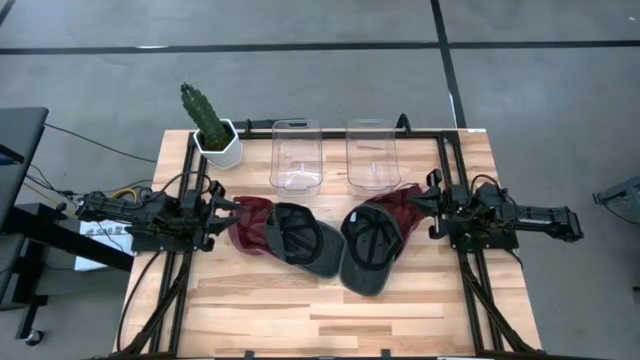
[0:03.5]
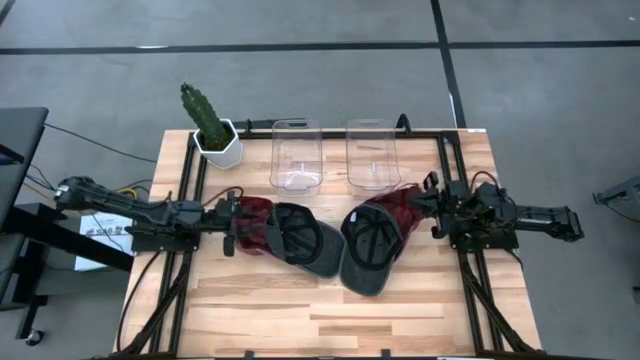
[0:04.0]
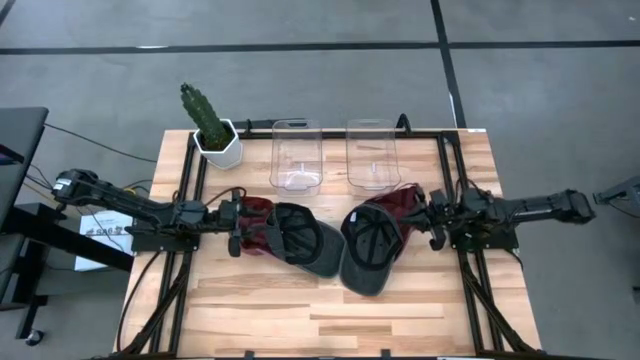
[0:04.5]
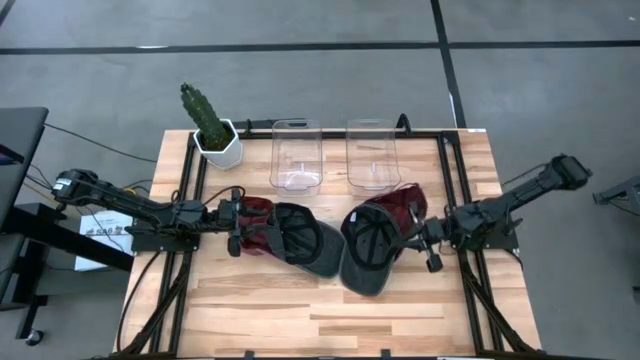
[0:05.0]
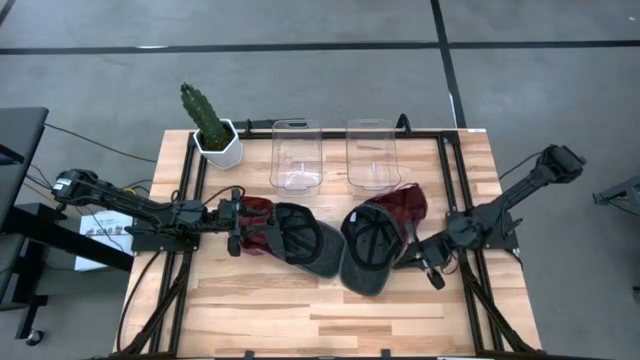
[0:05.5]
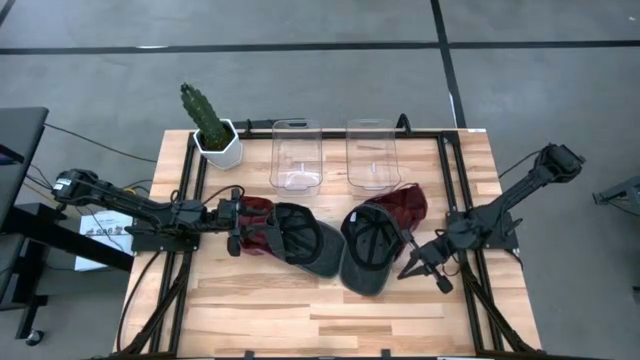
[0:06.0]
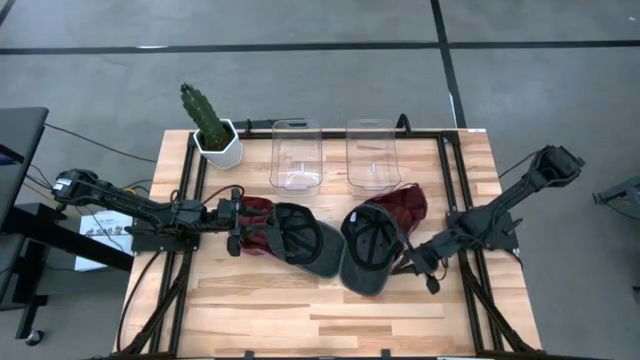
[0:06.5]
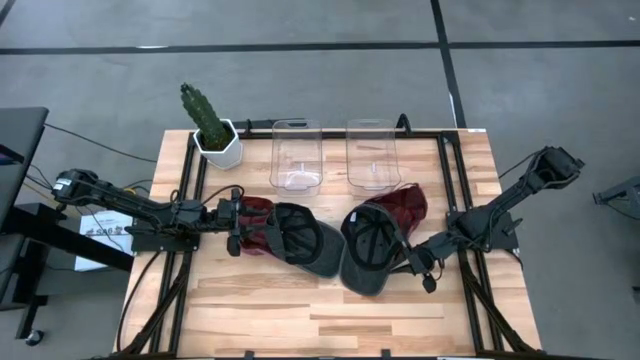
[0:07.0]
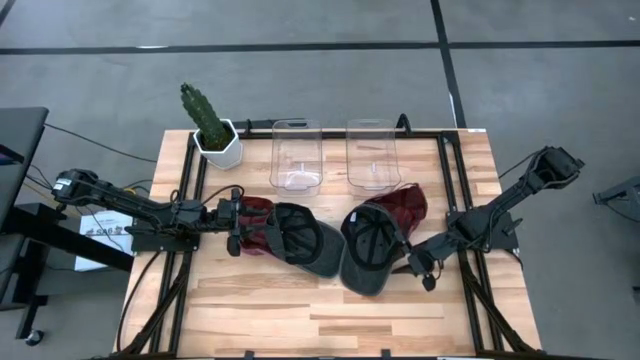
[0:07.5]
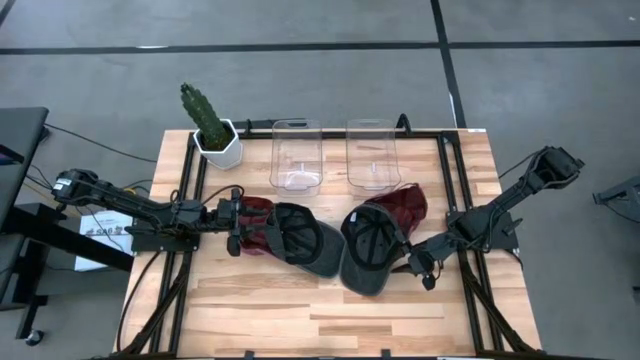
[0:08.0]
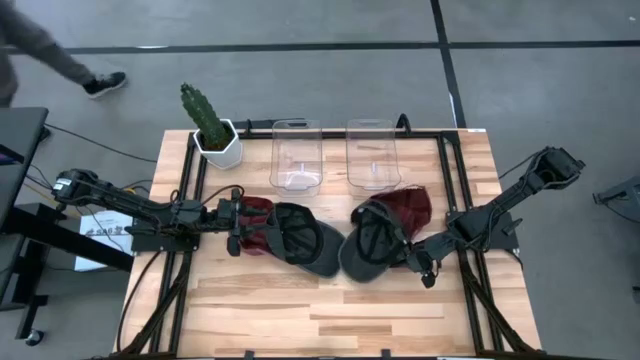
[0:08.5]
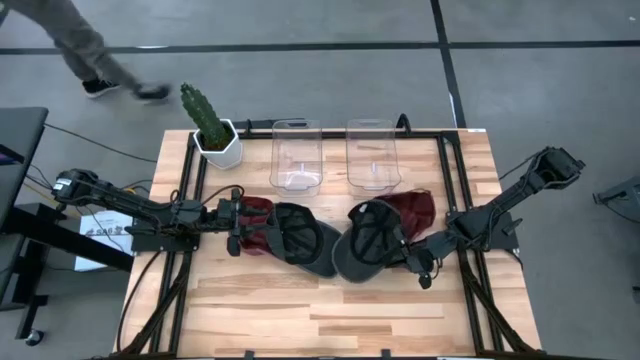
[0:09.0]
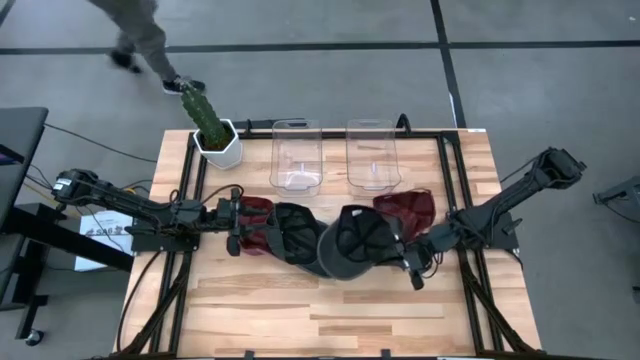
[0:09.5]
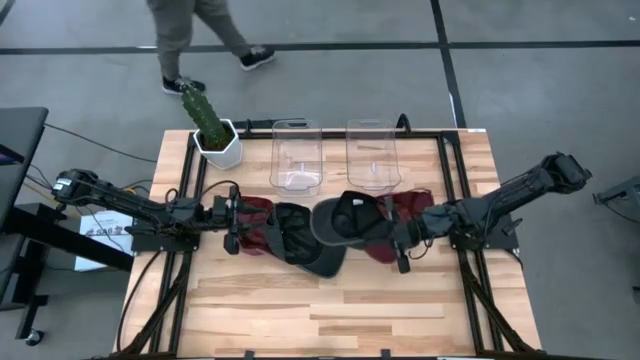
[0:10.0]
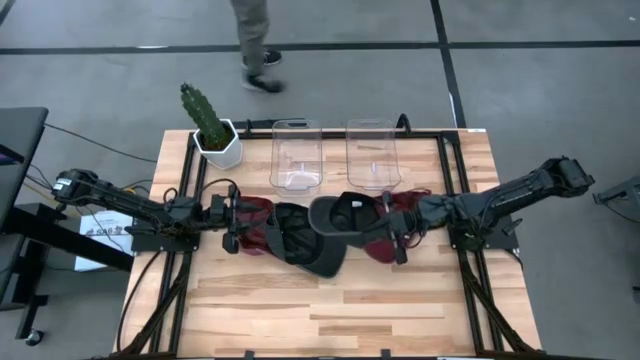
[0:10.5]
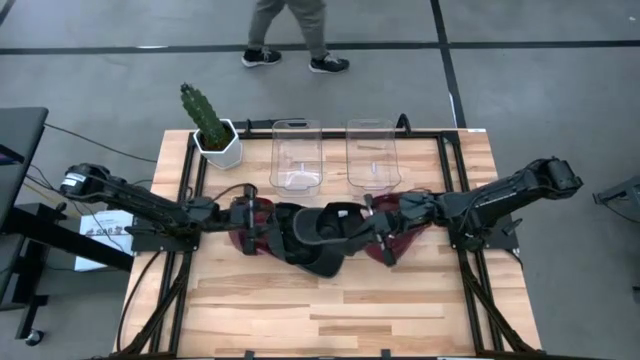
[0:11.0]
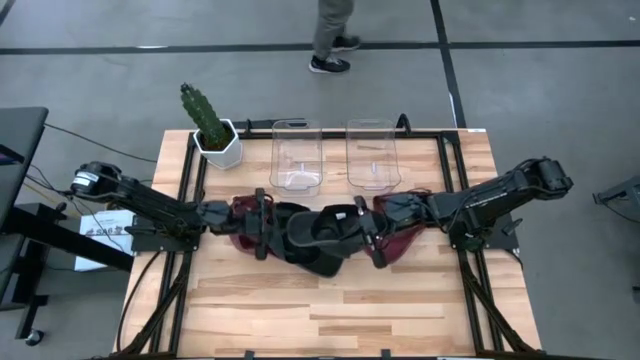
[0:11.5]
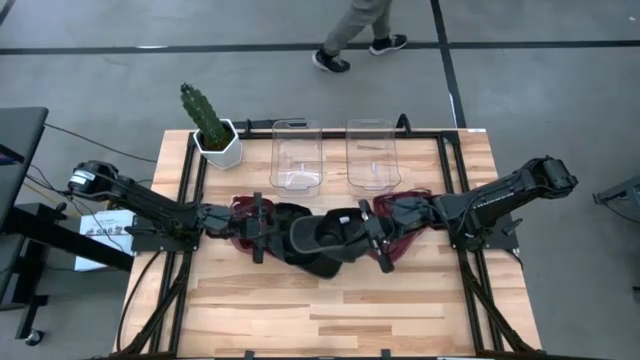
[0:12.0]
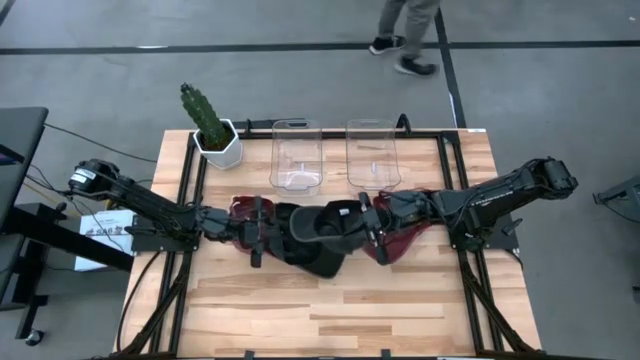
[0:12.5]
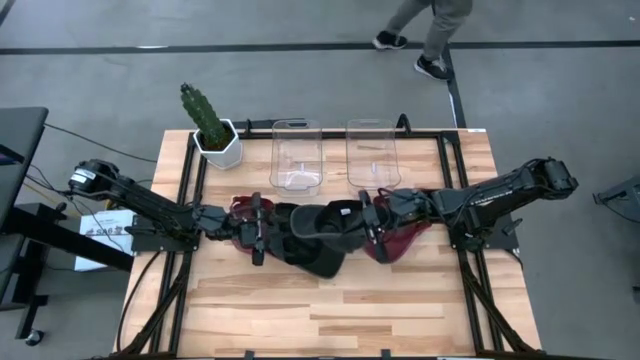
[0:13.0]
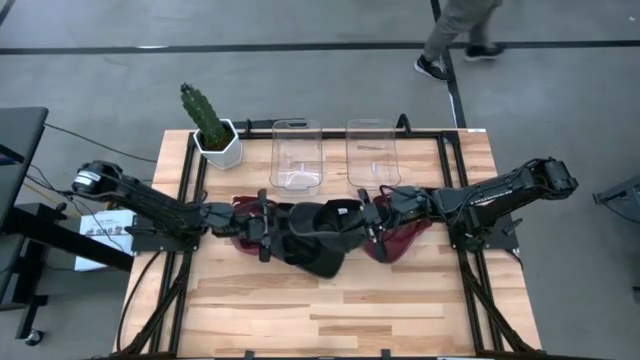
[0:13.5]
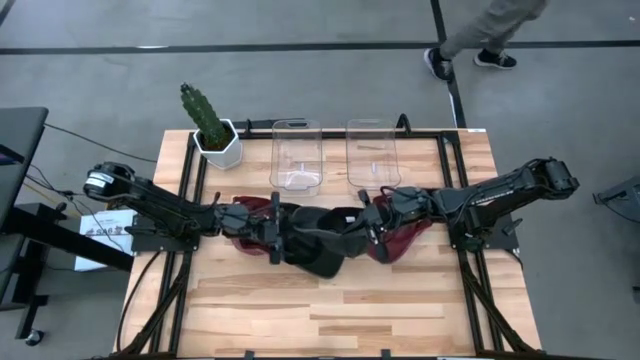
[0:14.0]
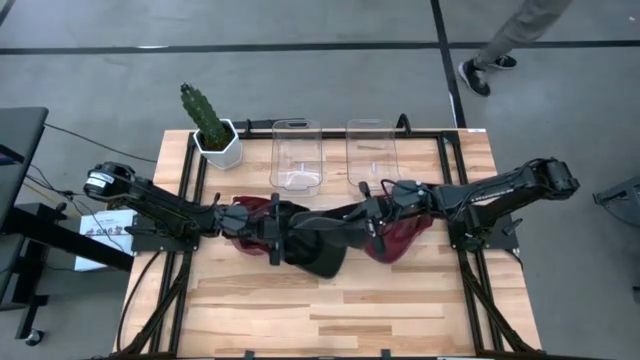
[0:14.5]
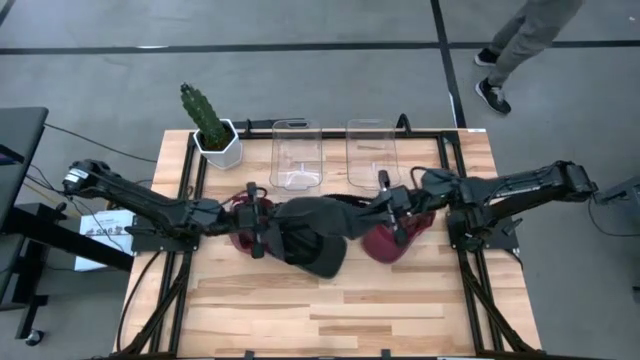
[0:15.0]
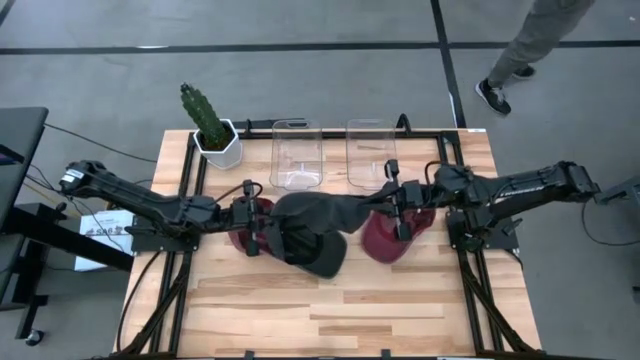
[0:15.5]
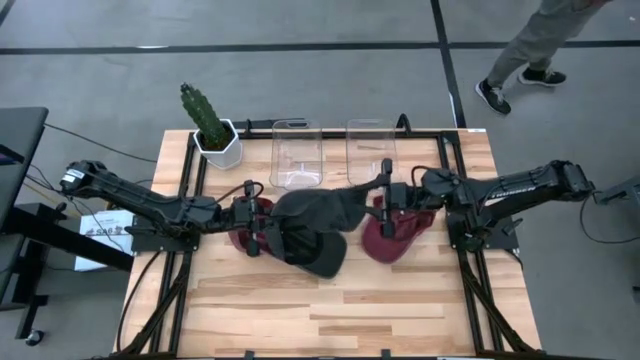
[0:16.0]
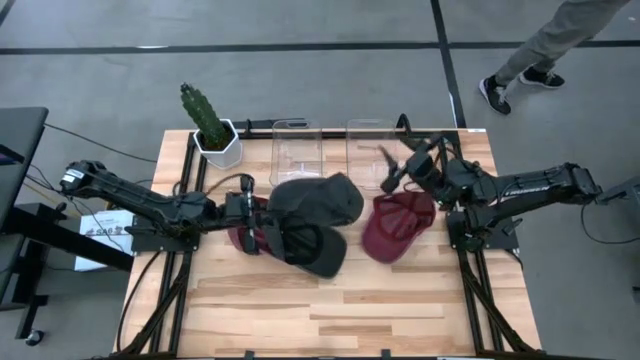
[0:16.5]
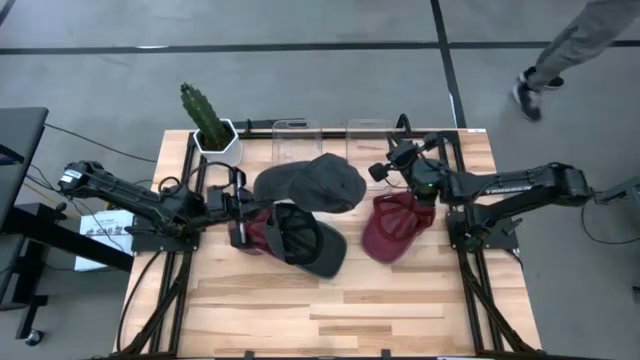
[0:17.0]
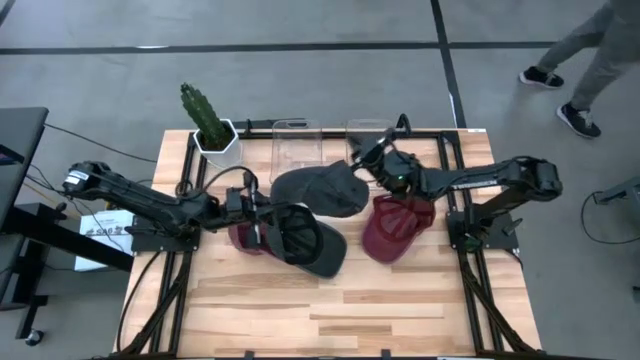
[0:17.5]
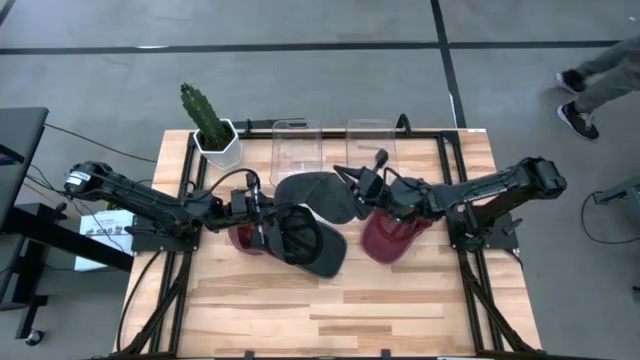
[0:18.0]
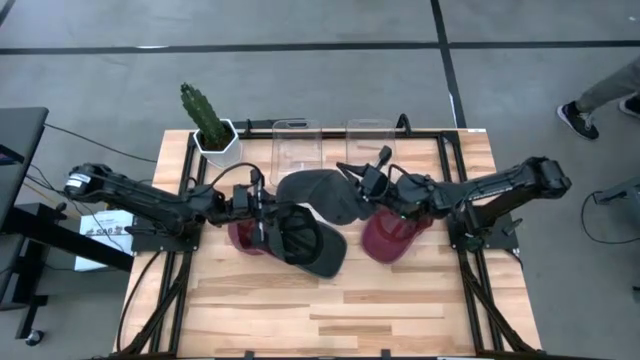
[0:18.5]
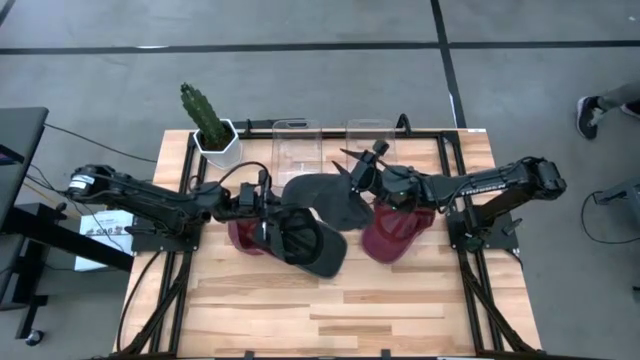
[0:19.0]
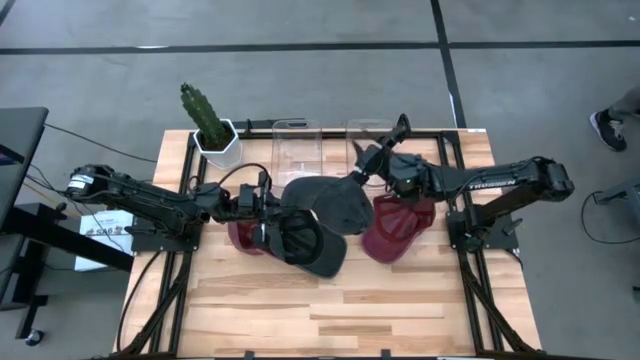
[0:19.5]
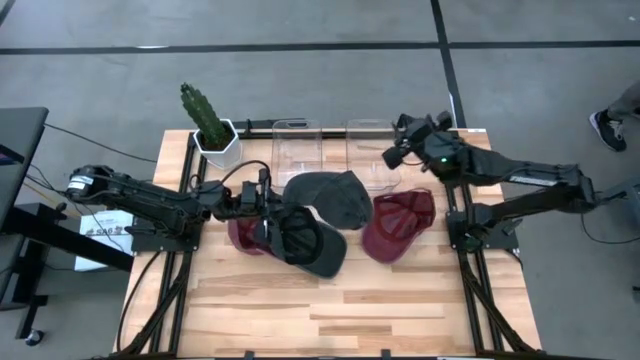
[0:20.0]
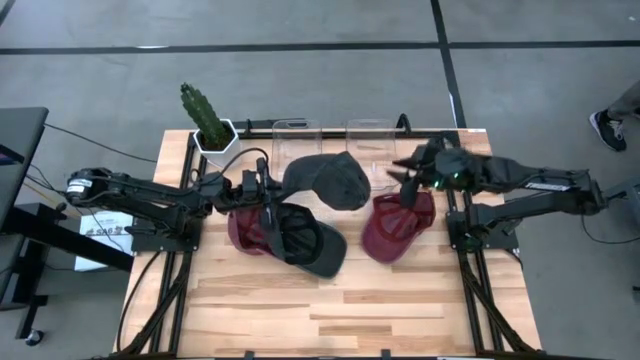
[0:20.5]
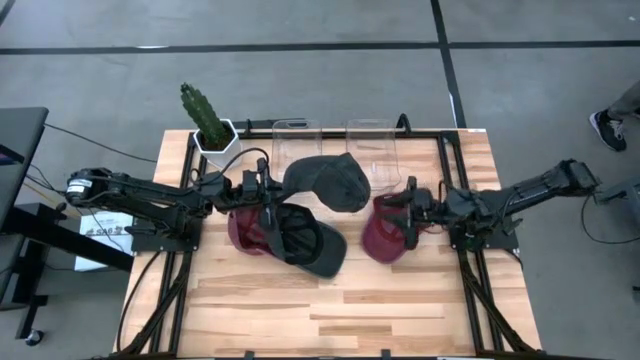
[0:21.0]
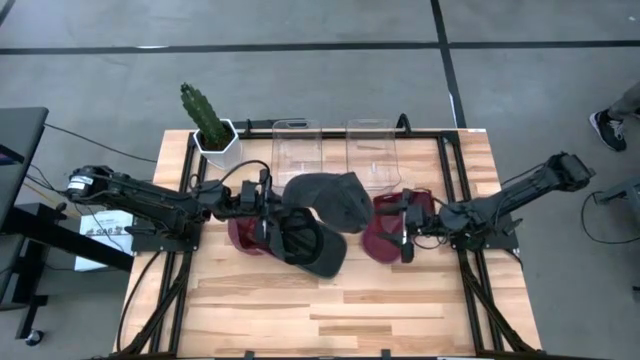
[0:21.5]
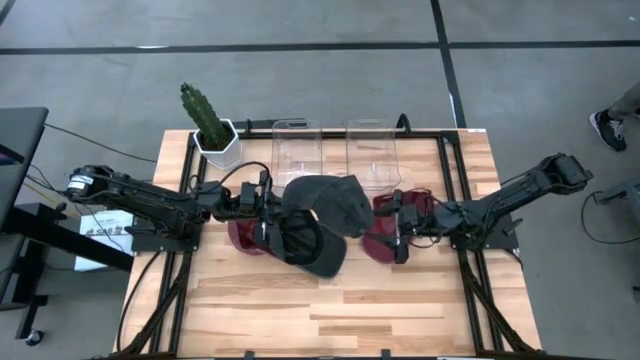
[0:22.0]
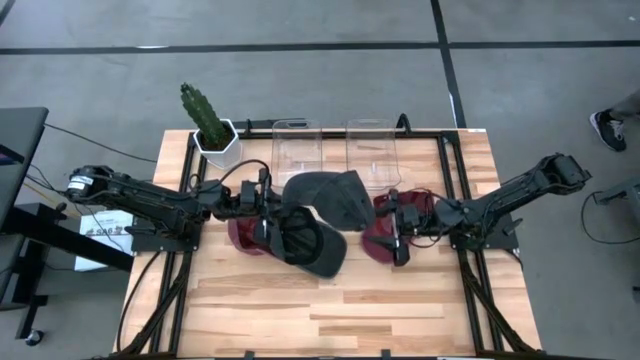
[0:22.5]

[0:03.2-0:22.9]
Task: Pick & Place hat
Put the right black cap into the transparent bin
